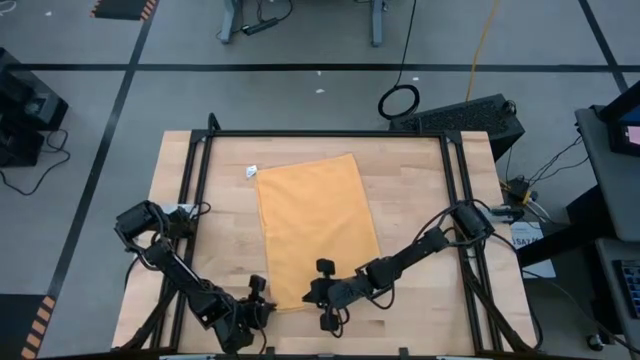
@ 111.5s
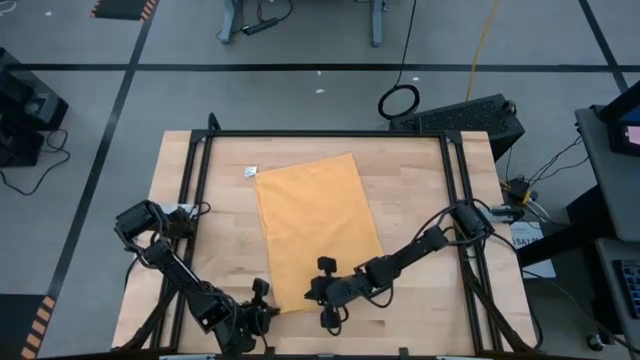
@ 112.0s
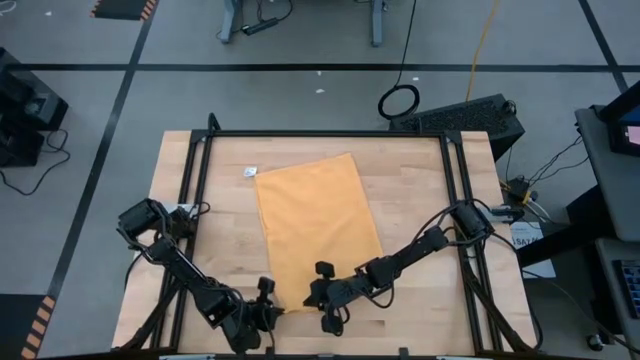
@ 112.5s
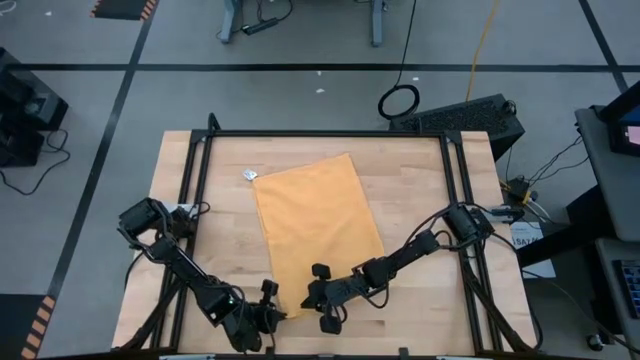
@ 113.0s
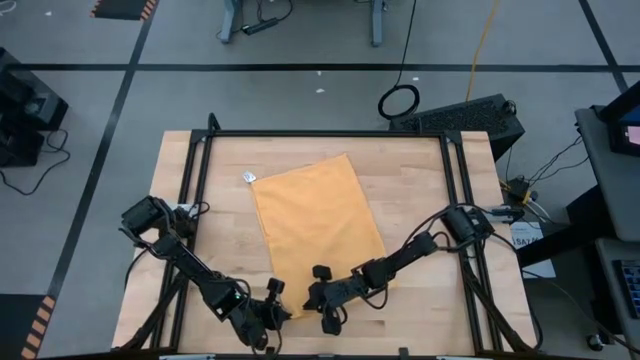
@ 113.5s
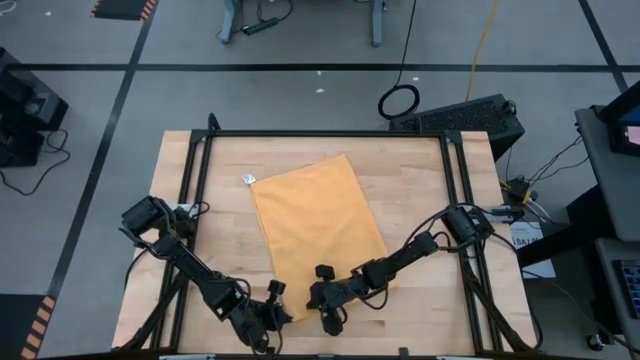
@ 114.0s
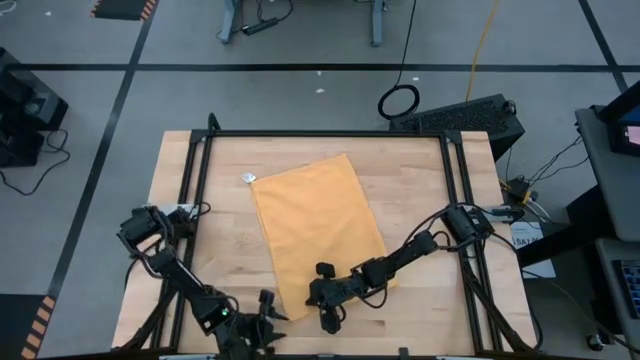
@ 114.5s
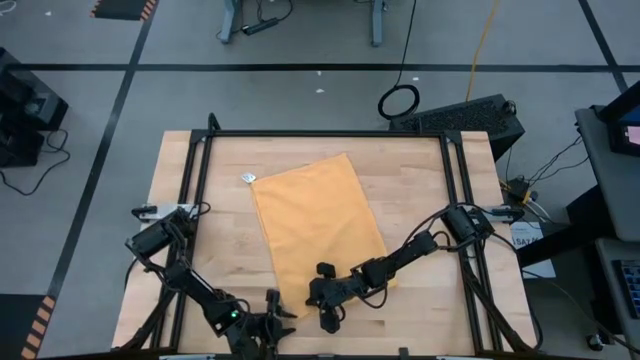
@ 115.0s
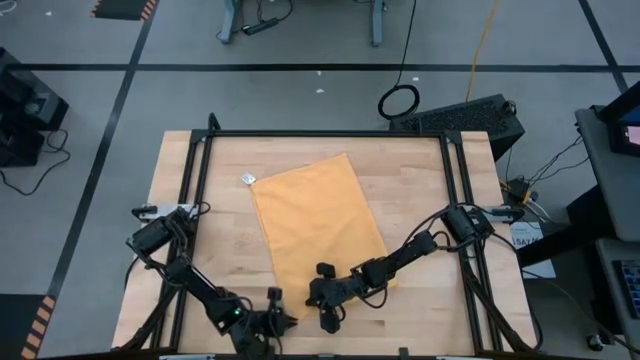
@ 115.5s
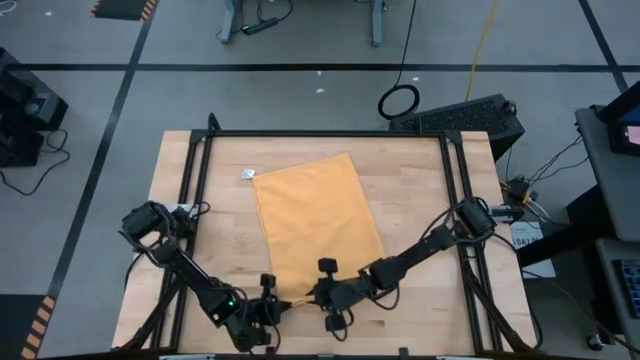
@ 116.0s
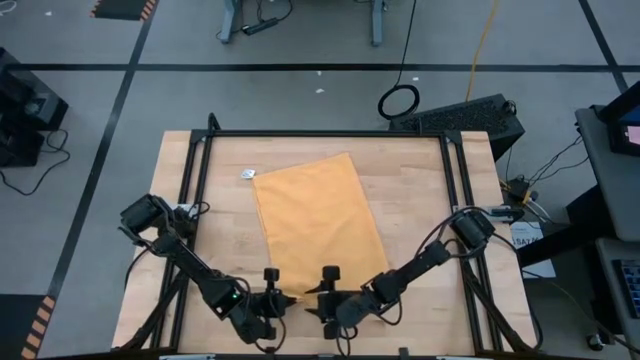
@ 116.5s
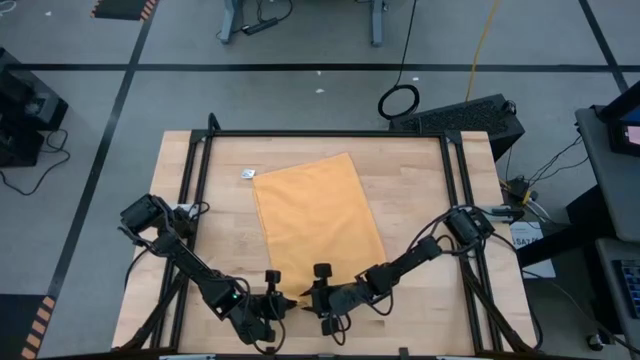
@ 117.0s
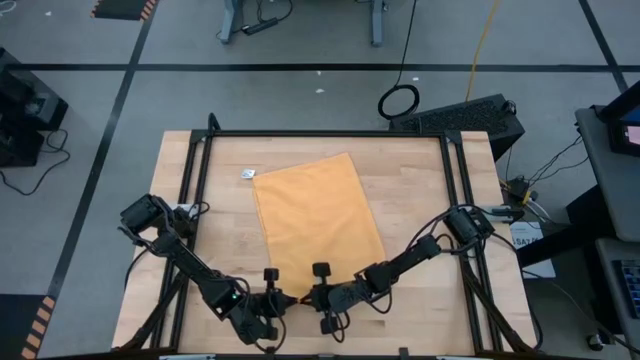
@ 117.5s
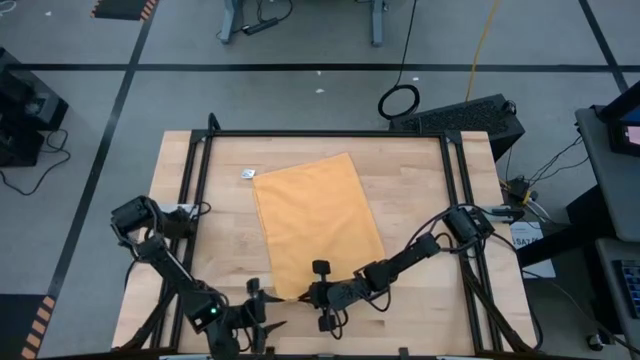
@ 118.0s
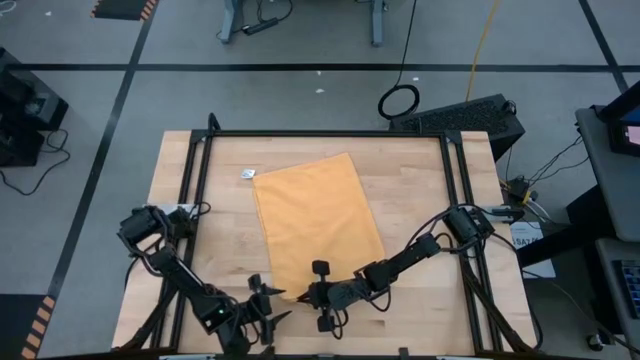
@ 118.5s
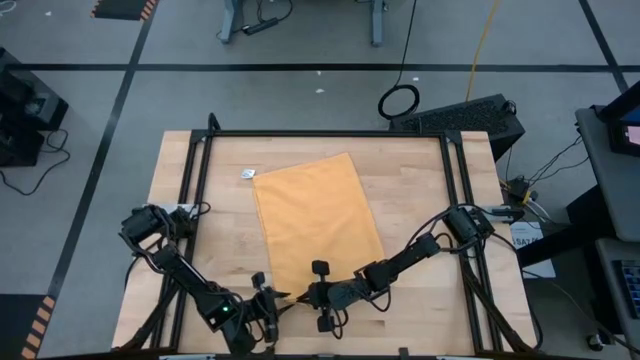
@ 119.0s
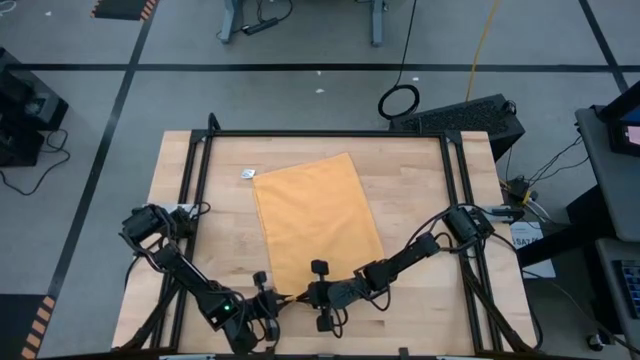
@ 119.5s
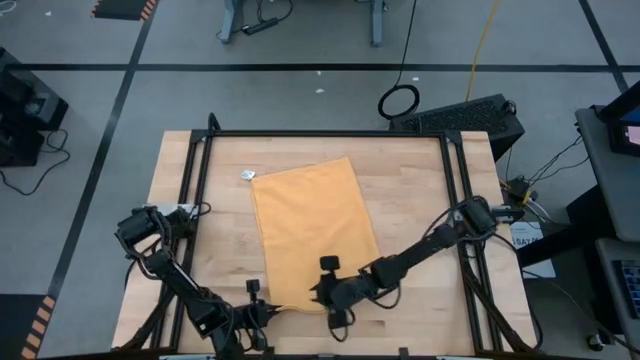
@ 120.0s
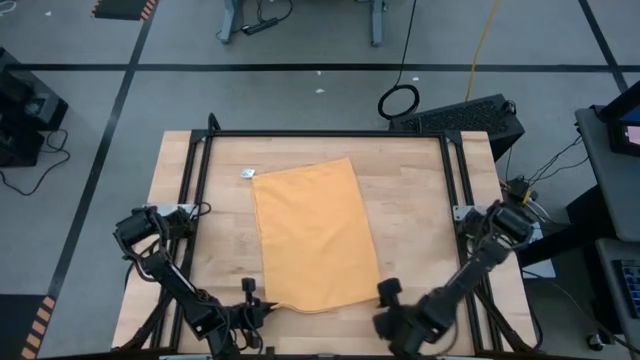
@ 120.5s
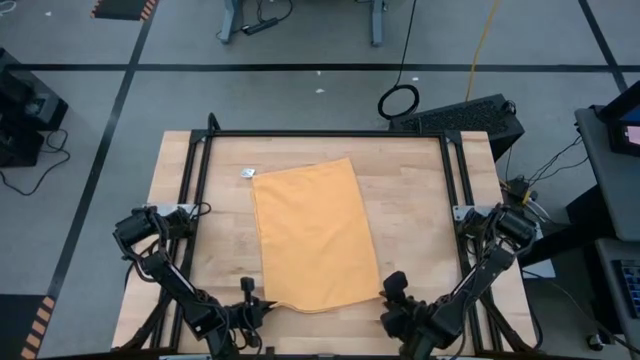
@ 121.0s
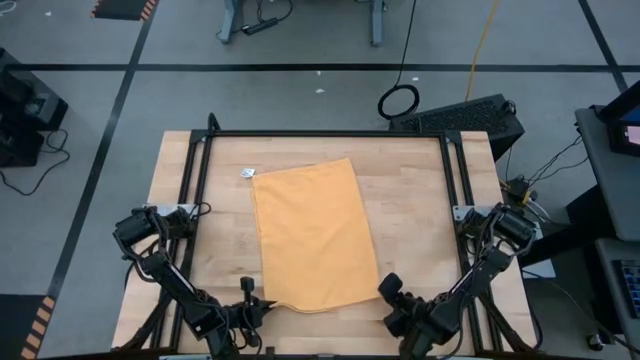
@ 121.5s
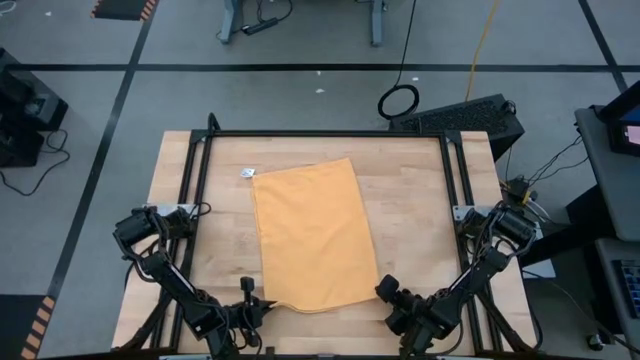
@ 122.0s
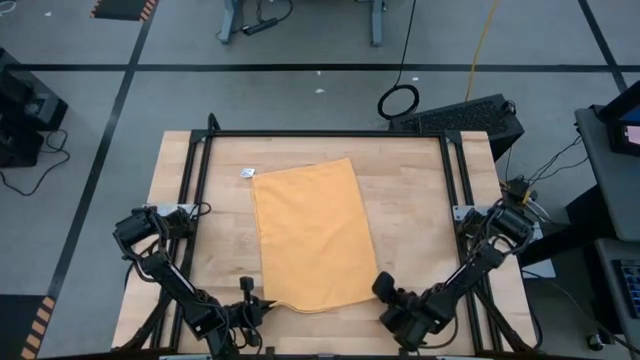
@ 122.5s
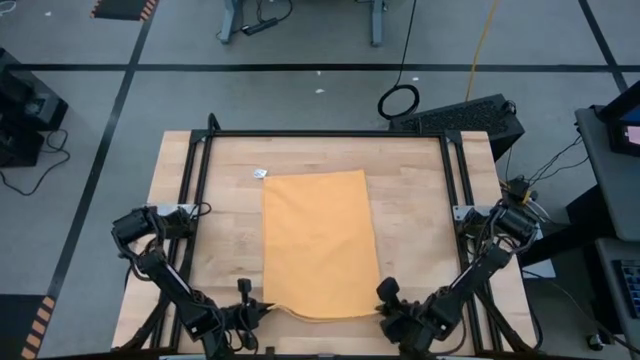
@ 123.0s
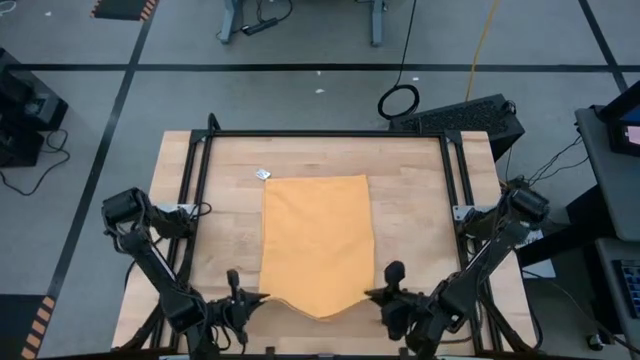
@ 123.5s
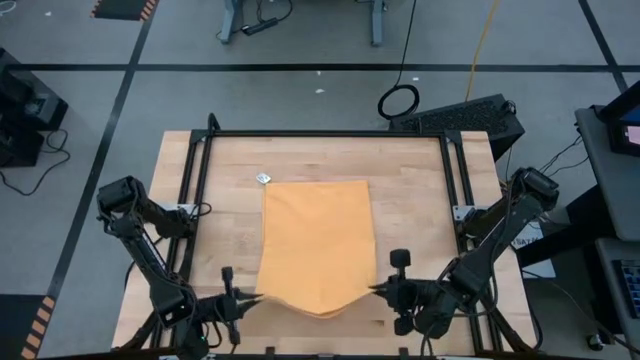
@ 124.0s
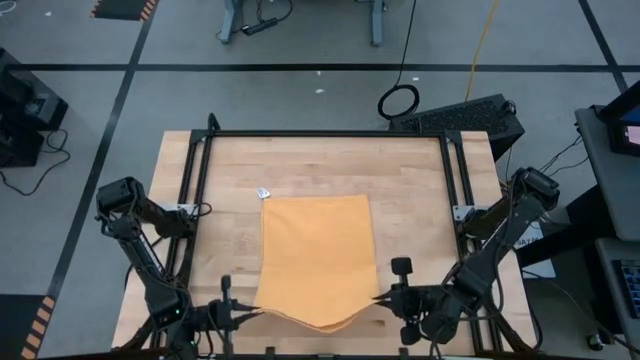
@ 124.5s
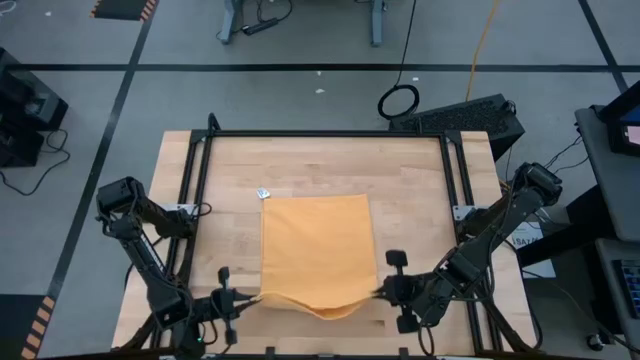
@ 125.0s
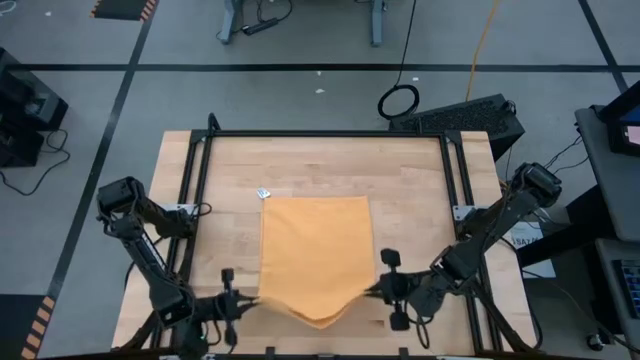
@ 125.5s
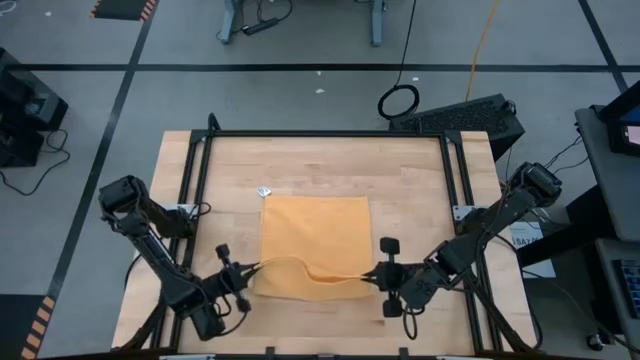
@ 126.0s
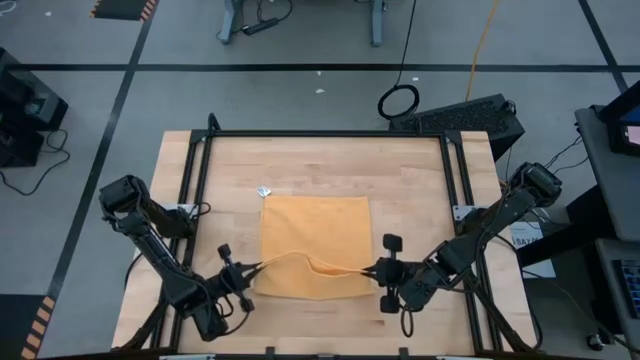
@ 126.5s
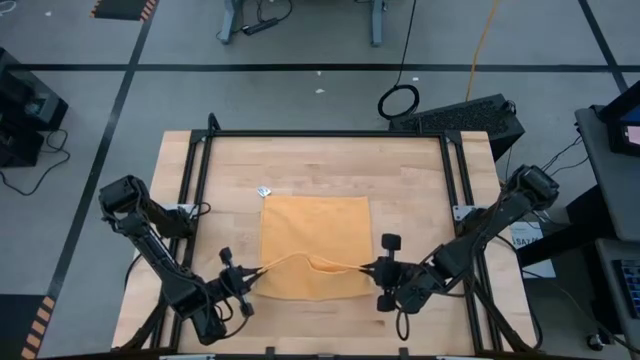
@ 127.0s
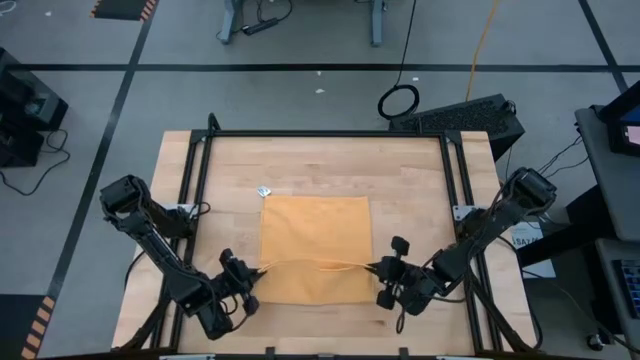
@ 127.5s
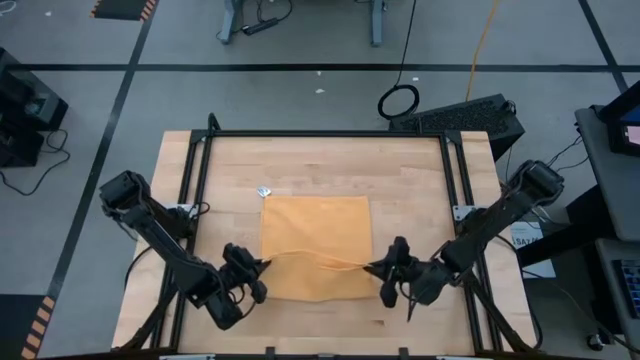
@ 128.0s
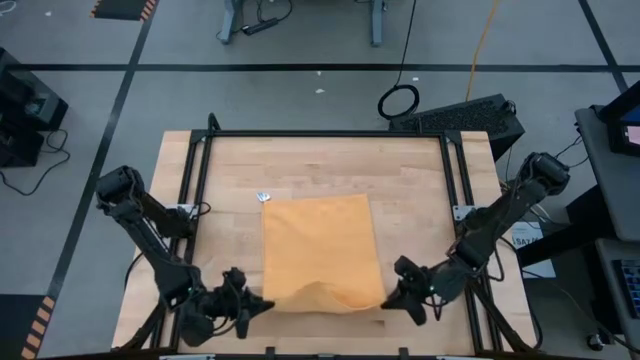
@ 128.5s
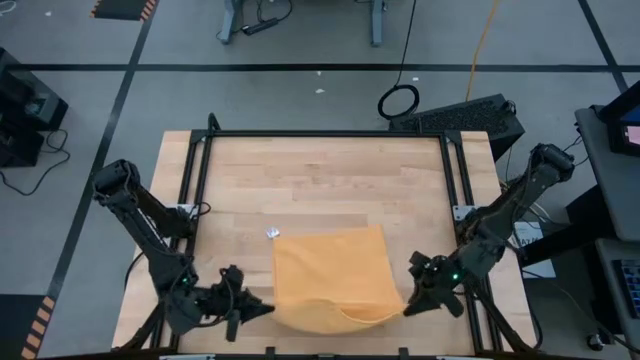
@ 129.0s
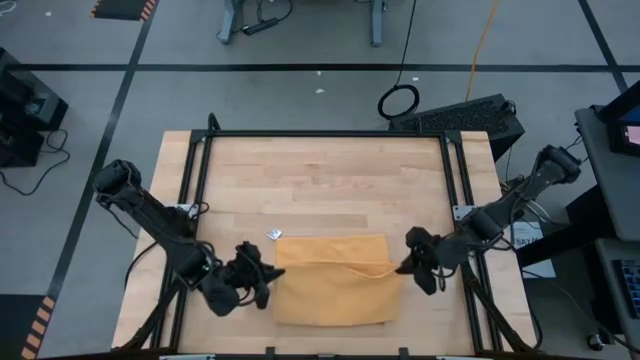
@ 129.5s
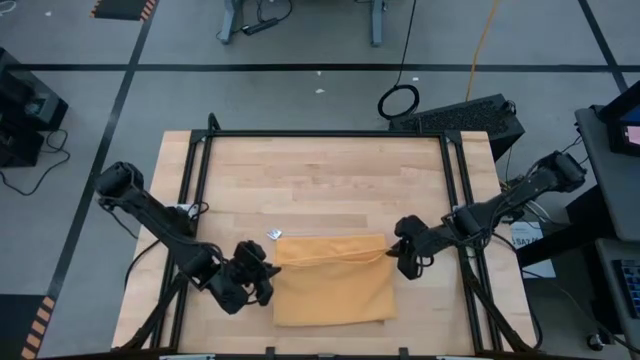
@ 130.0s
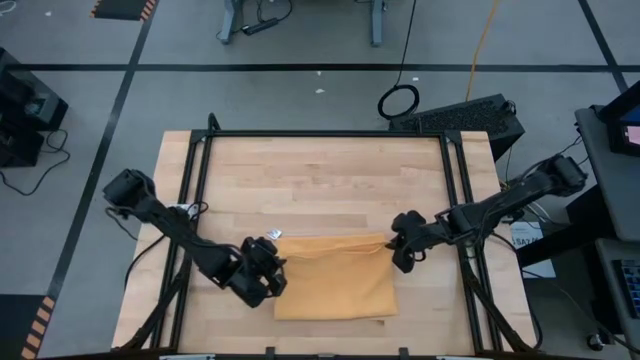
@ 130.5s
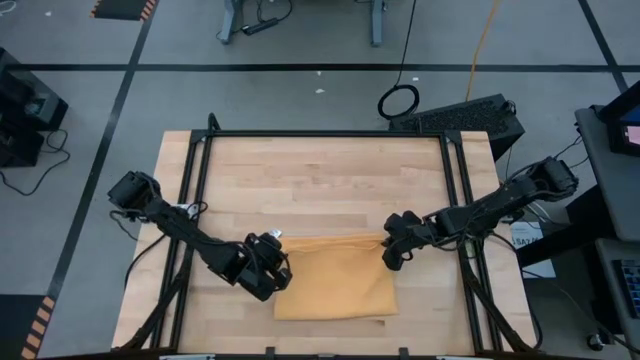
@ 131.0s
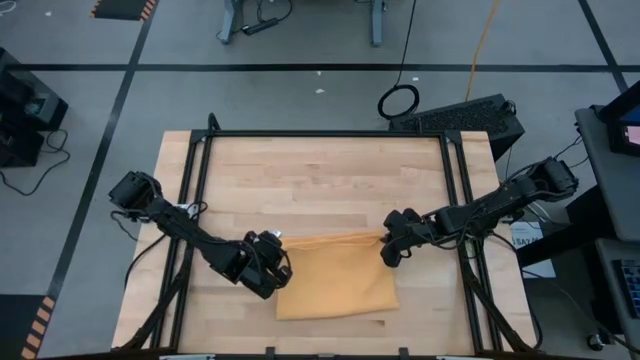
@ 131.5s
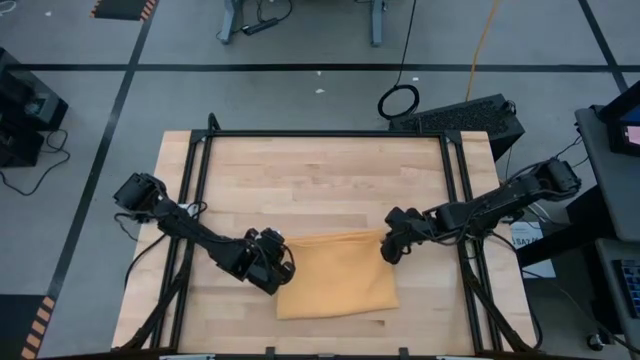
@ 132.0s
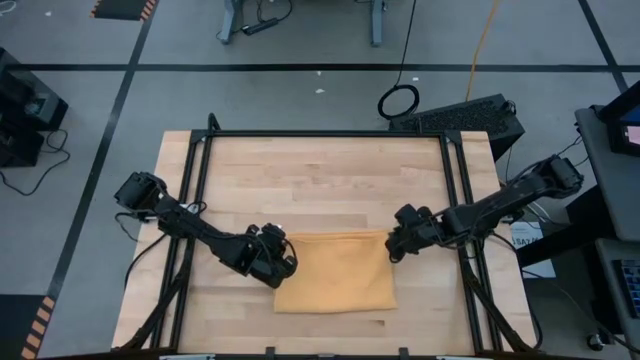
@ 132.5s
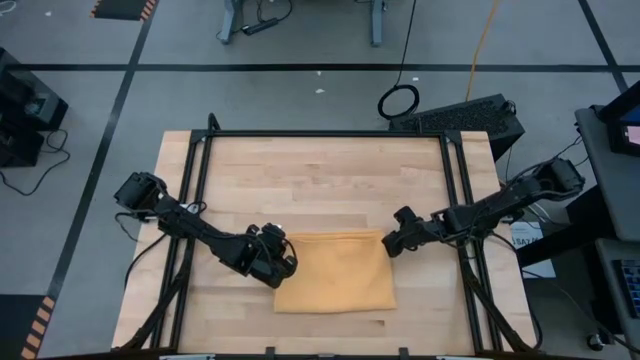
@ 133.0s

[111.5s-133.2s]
Task: Roll towel
Fold the yellow towel in
